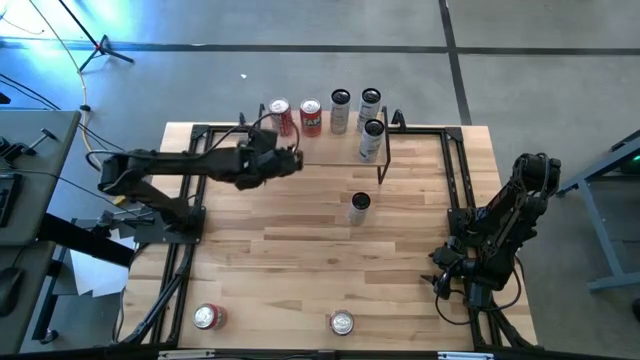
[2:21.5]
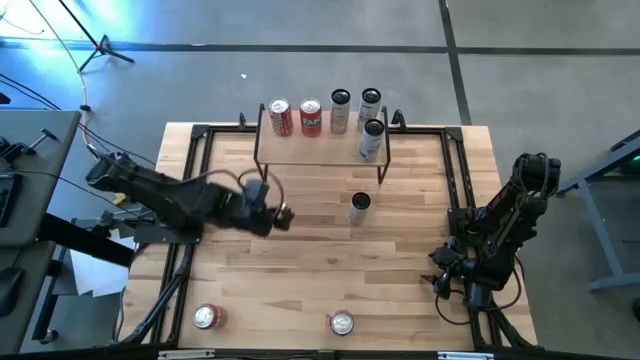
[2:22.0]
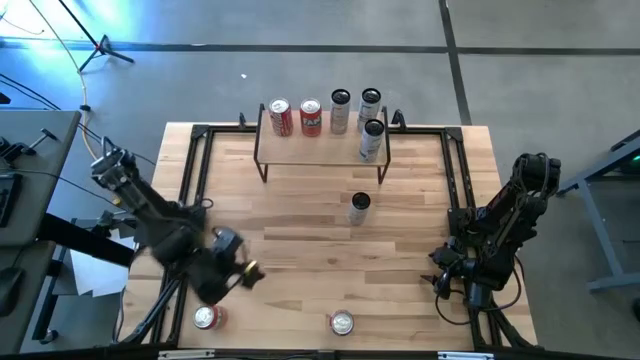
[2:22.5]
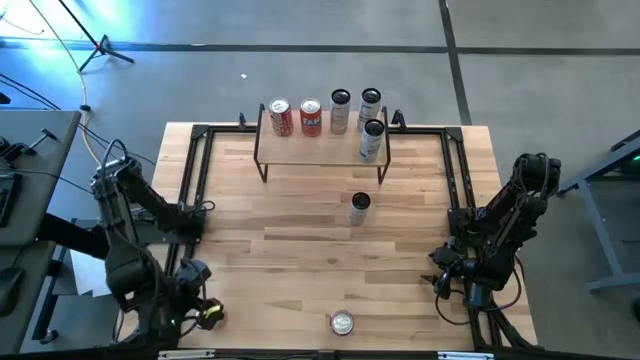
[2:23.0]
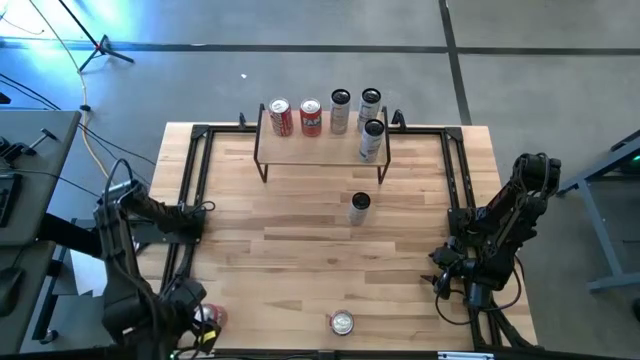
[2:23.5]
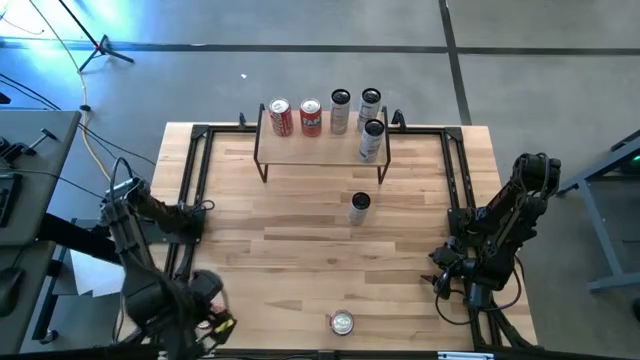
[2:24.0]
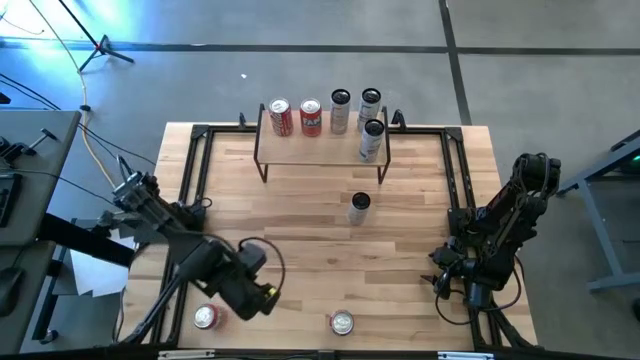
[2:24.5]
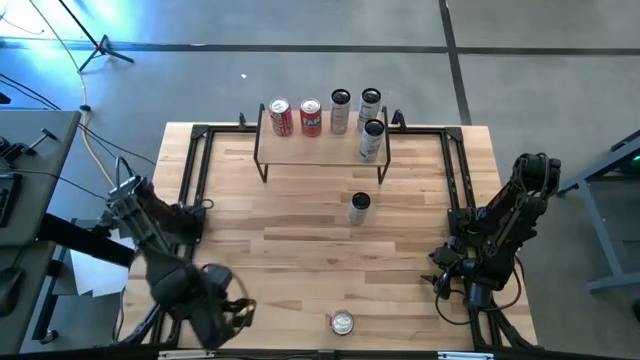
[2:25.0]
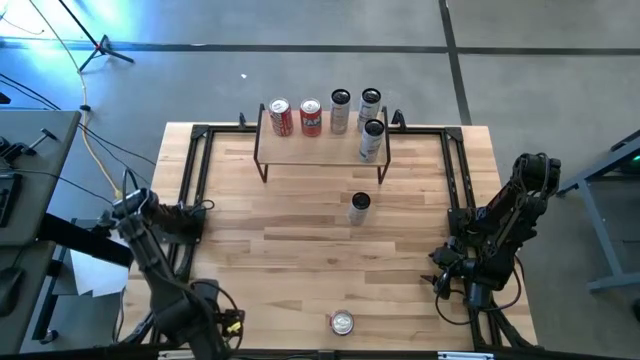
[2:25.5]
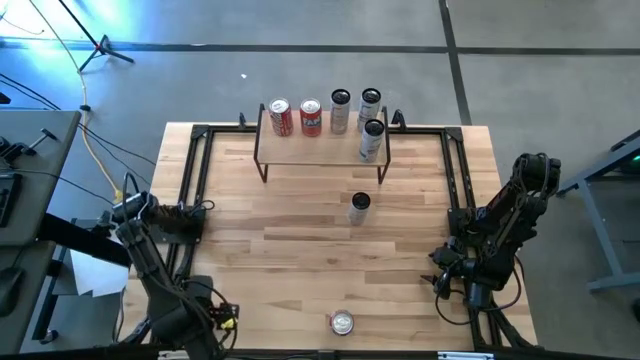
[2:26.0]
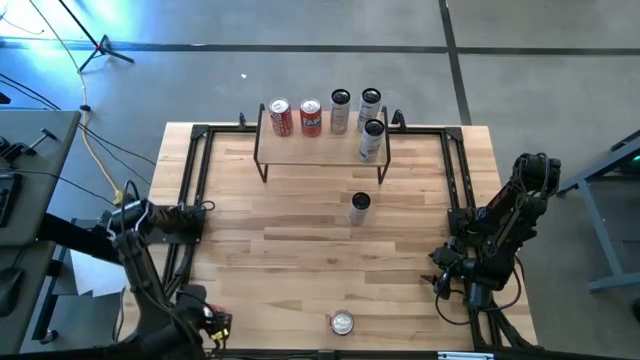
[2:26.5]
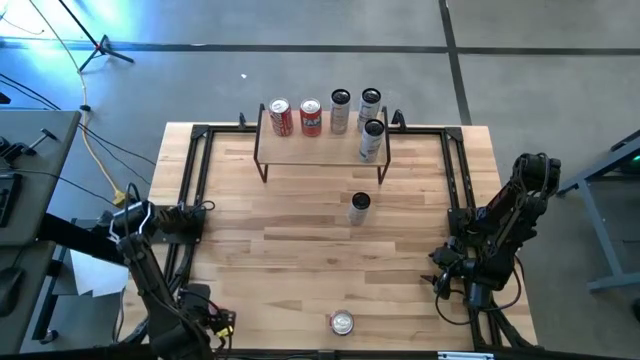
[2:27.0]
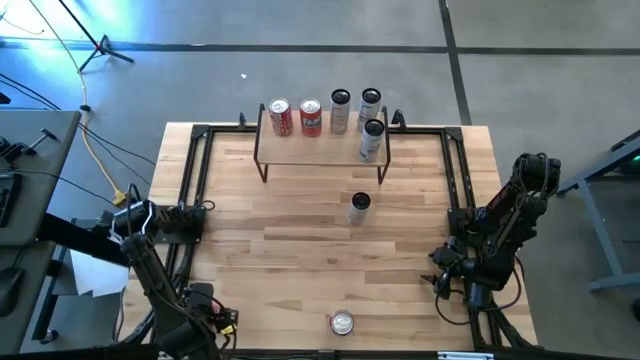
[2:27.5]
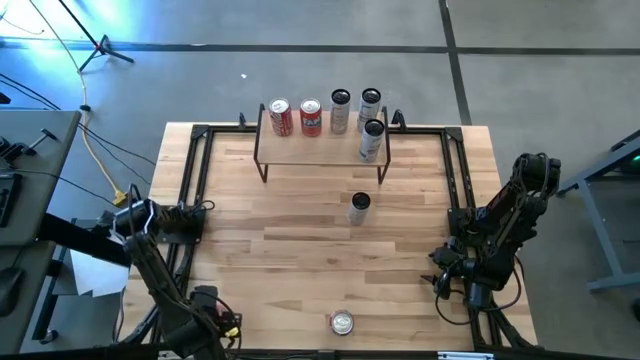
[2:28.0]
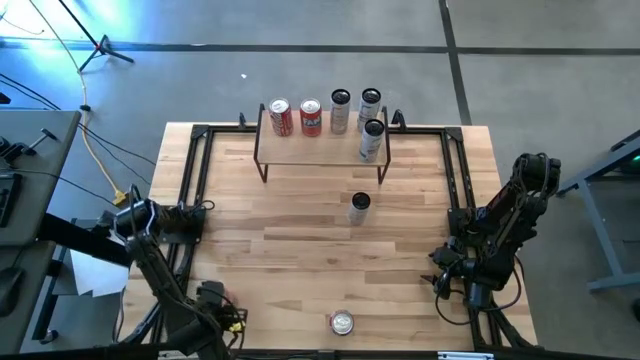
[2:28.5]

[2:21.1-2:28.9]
Task: Place canned beverage on shelf
Put the red soda can on the shelf aligned with the red soda can

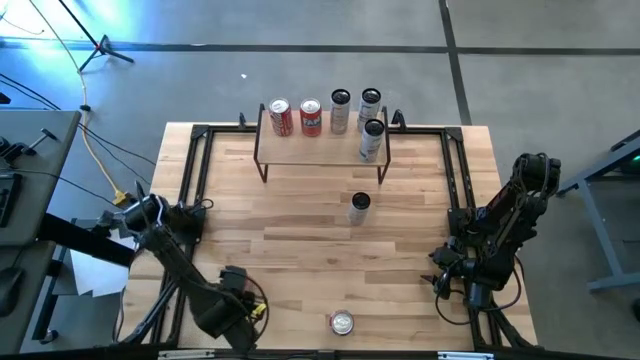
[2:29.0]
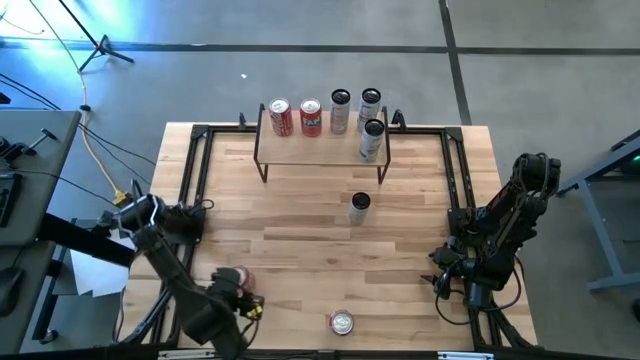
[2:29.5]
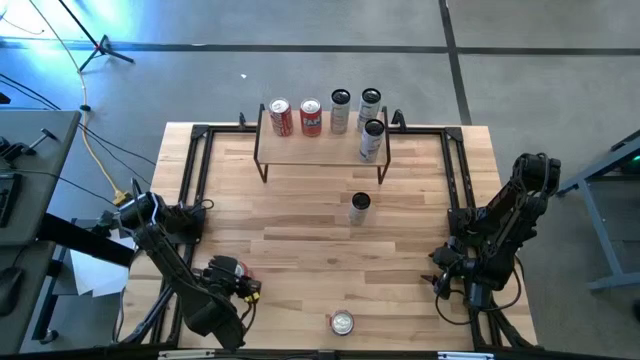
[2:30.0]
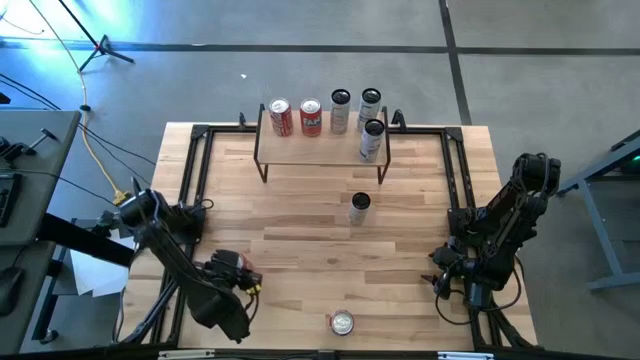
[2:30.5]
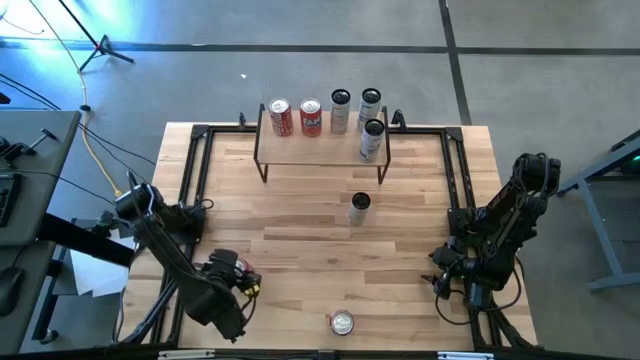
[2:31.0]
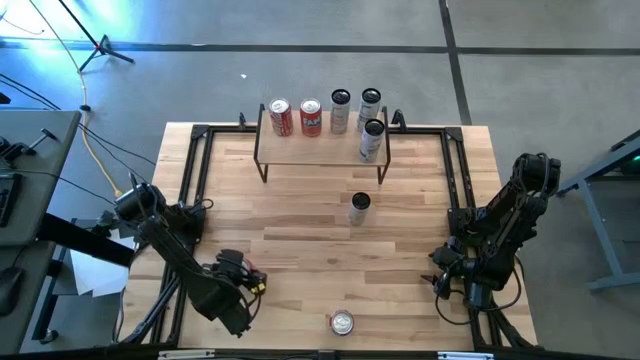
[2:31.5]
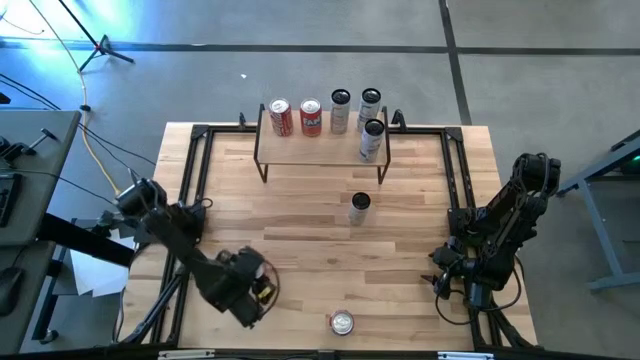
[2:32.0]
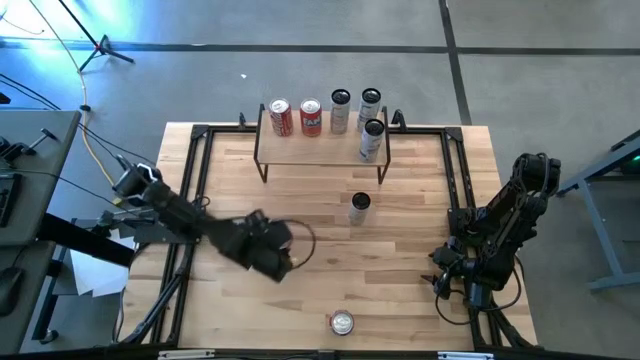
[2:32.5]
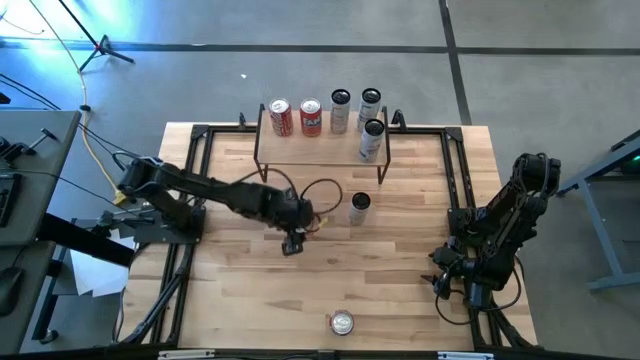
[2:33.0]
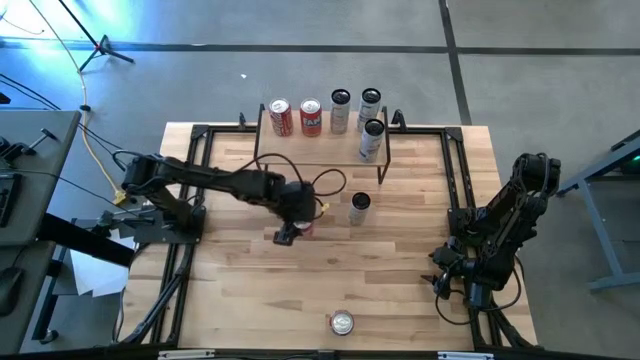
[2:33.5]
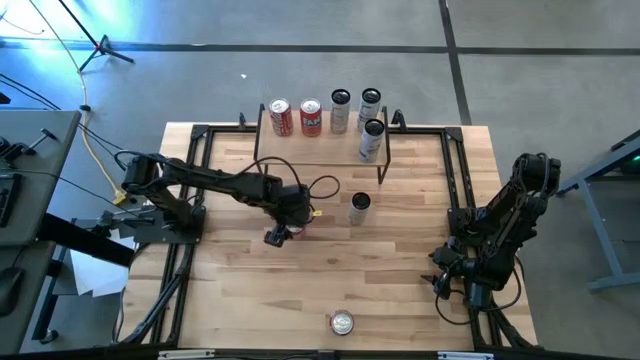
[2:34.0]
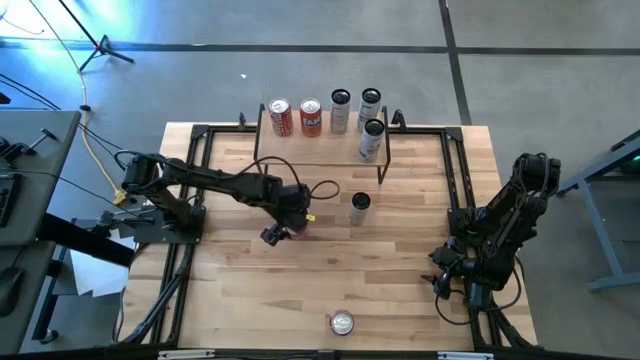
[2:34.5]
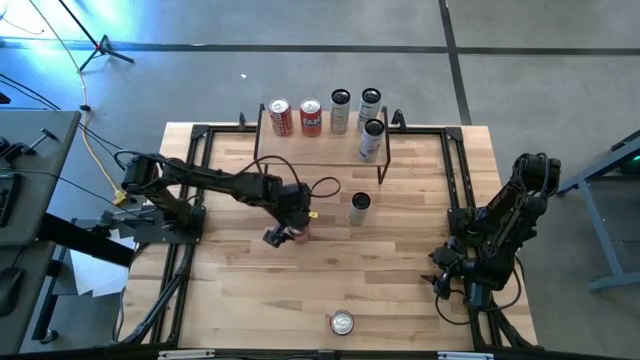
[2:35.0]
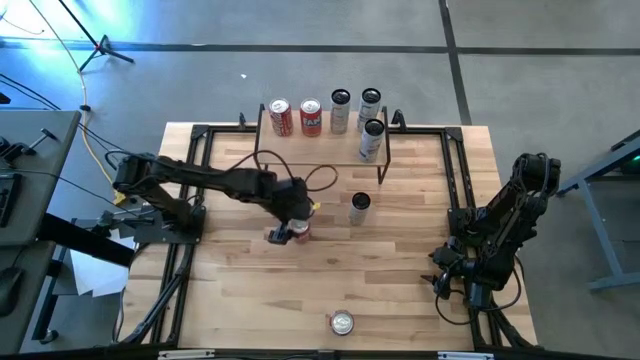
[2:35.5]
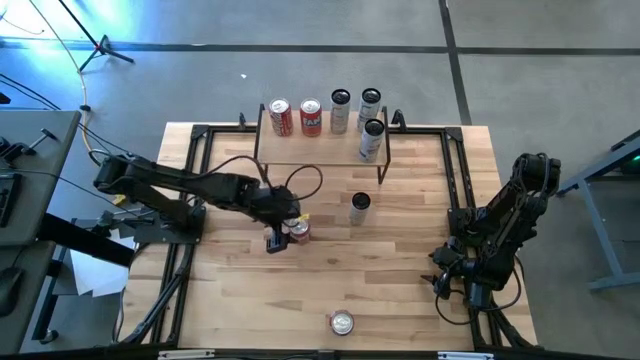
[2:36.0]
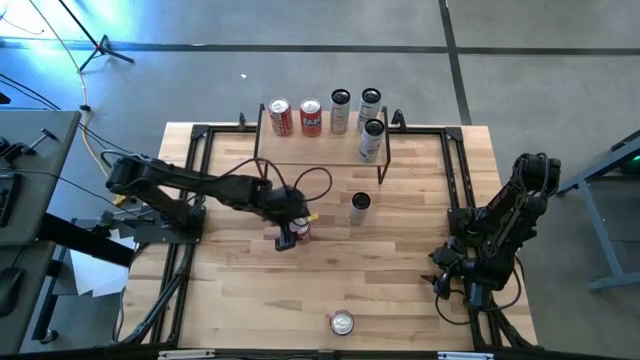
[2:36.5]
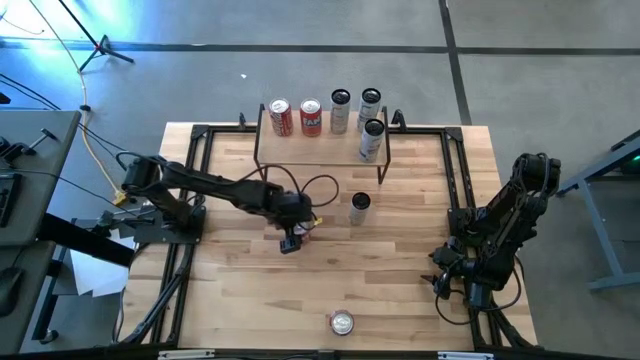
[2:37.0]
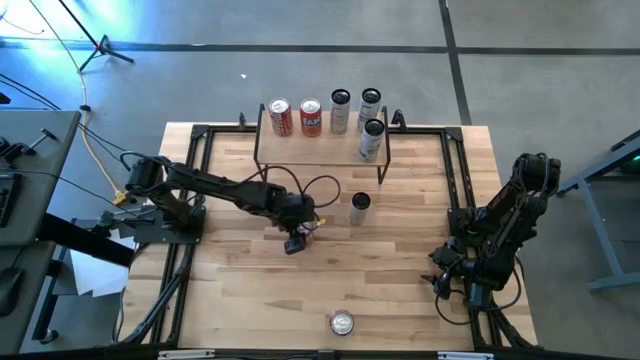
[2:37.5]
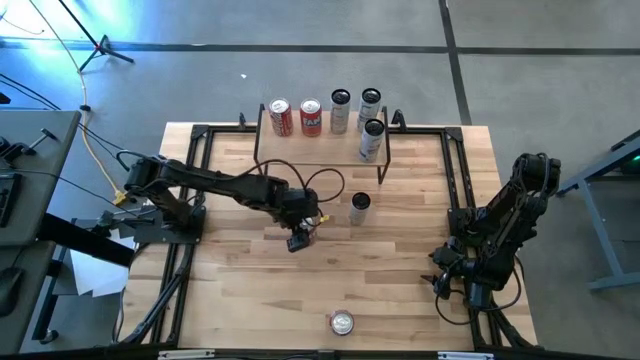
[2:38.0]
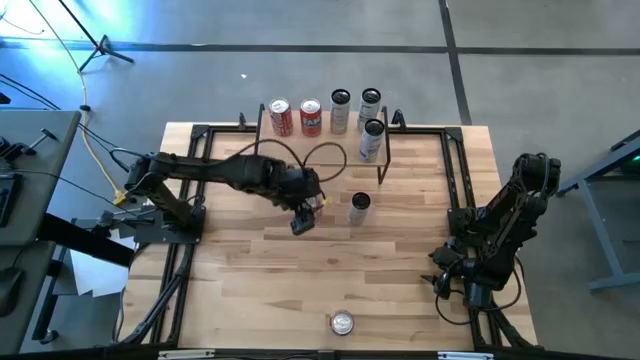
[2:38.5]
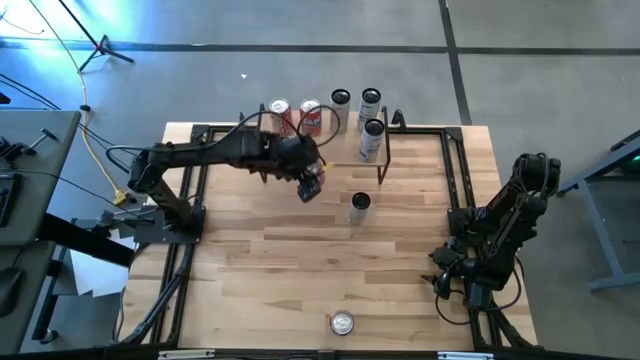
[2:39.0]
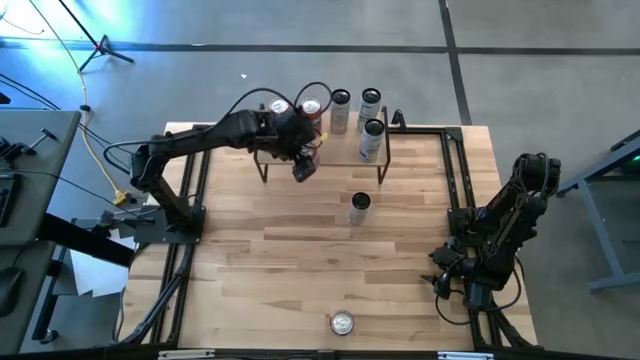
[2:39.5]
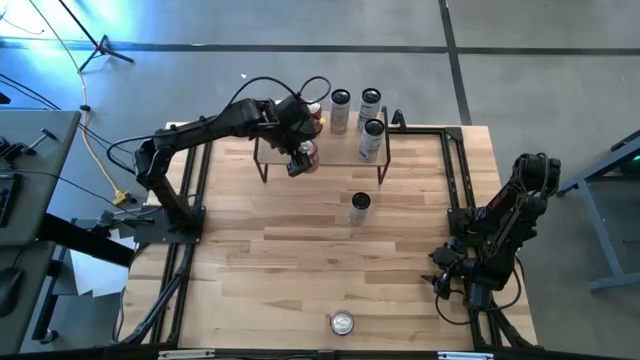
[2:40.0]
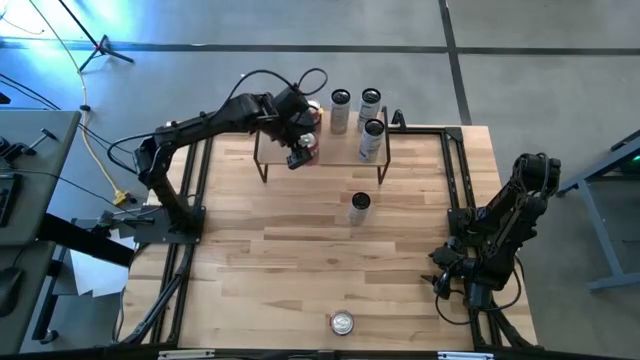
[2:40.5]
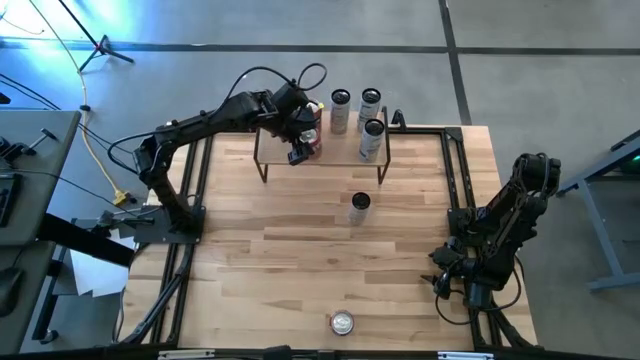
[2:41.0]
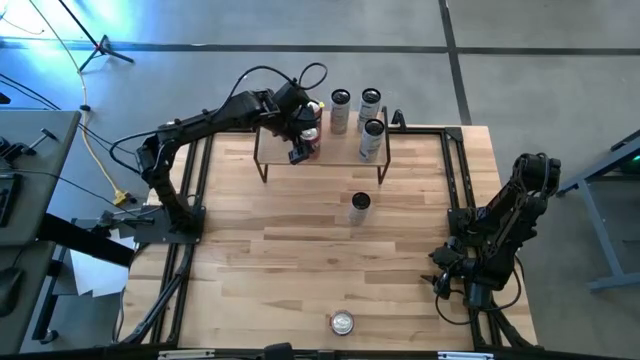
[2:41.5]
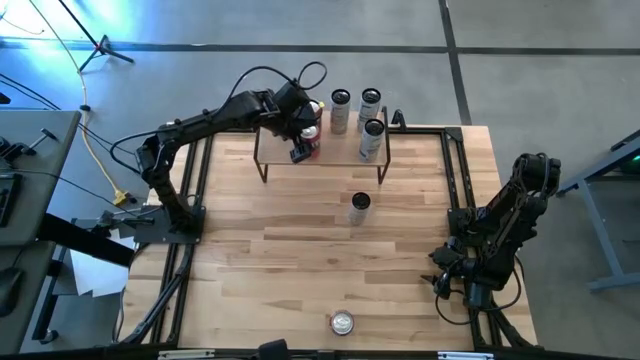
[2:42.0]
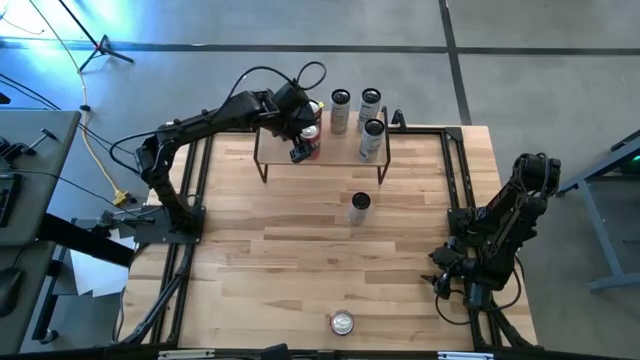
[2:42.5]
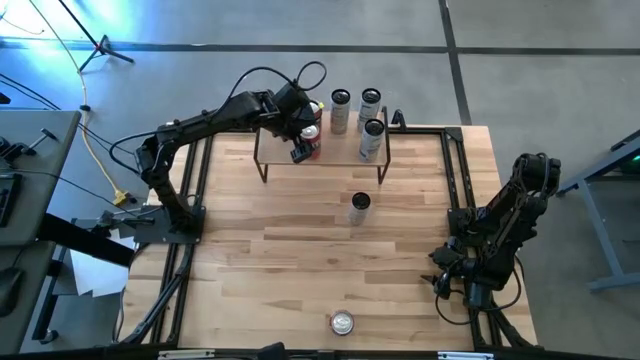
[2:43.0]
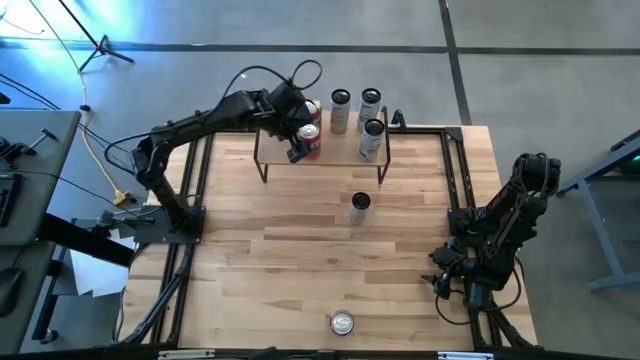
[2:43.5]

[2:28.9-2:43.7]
Put the red soda can on the shelf aligned with the red soda can
